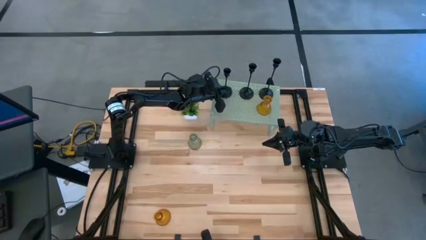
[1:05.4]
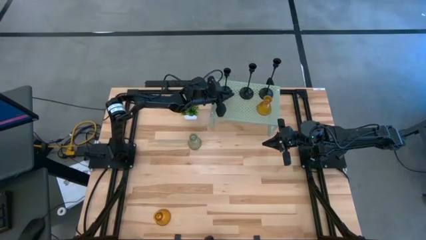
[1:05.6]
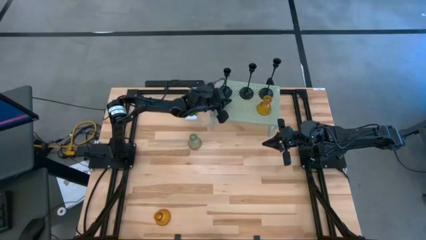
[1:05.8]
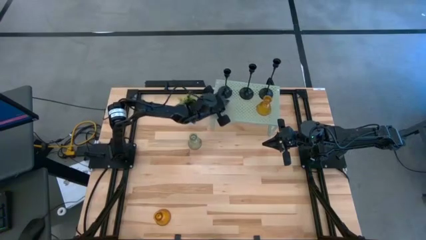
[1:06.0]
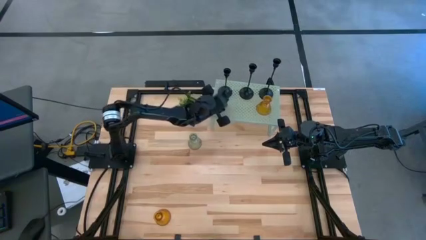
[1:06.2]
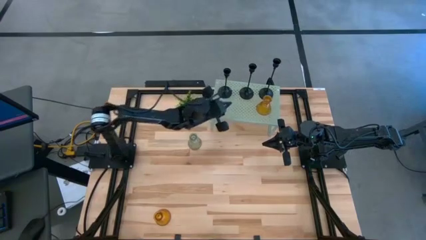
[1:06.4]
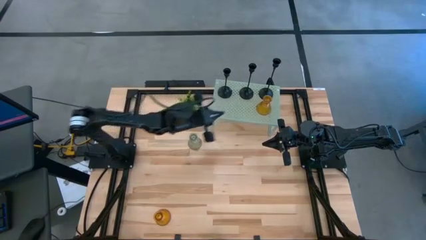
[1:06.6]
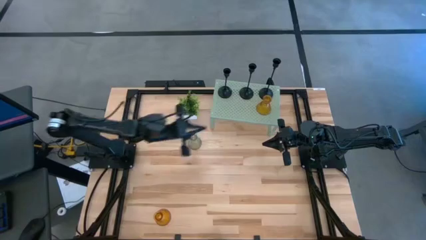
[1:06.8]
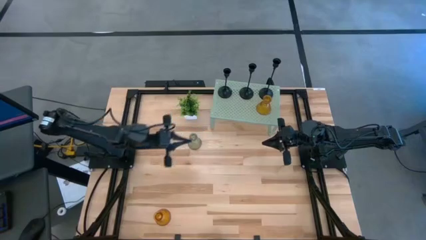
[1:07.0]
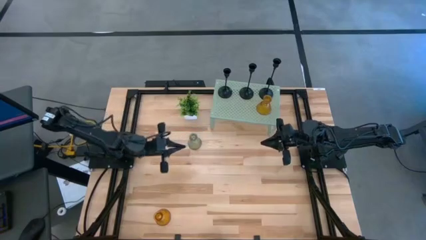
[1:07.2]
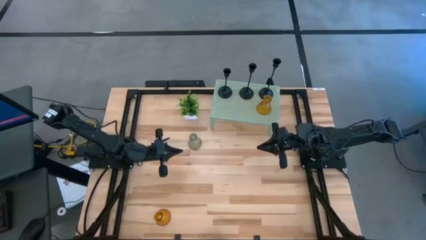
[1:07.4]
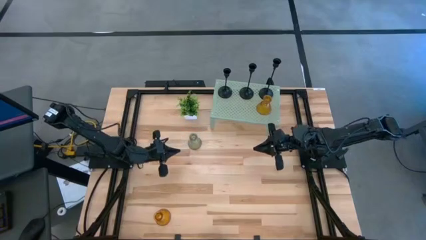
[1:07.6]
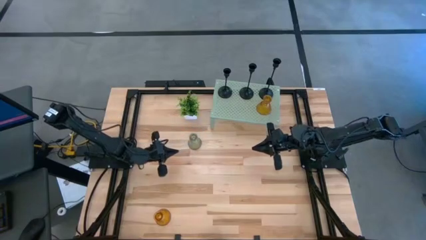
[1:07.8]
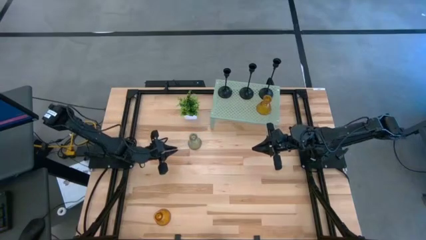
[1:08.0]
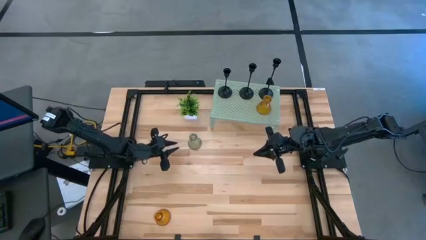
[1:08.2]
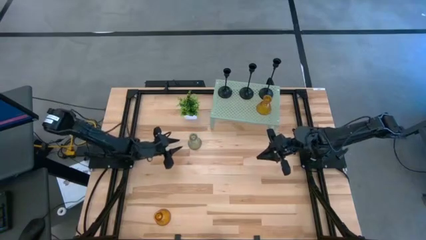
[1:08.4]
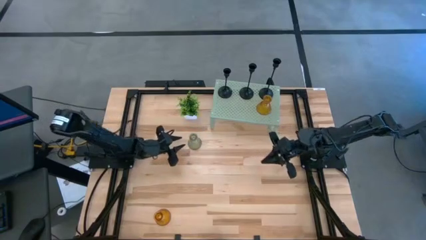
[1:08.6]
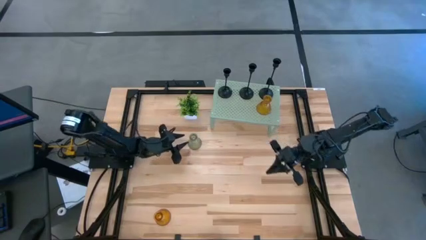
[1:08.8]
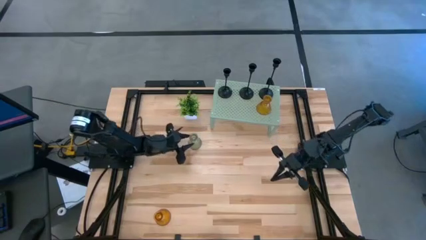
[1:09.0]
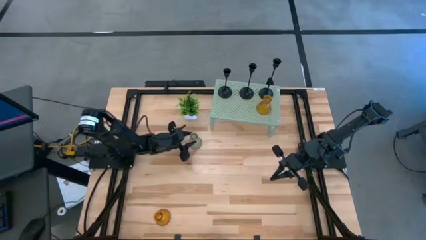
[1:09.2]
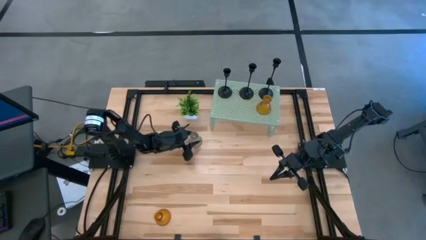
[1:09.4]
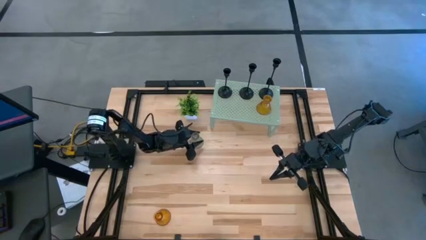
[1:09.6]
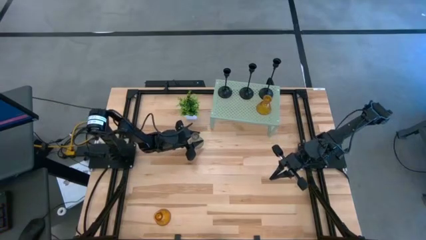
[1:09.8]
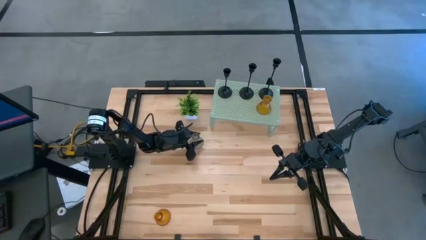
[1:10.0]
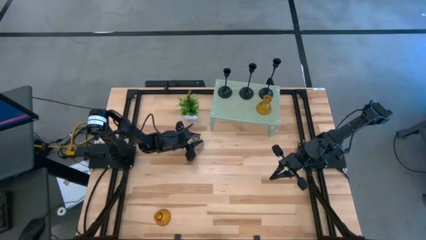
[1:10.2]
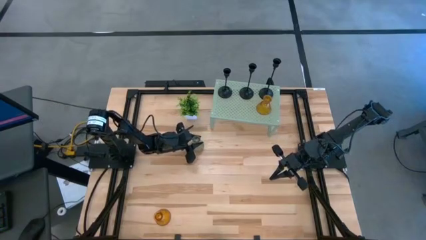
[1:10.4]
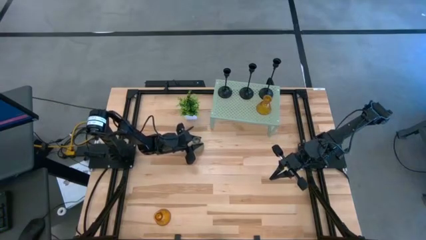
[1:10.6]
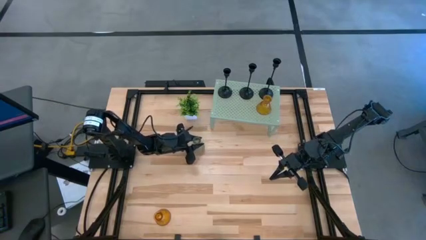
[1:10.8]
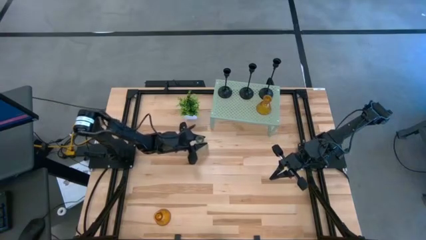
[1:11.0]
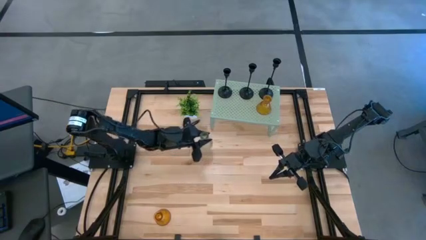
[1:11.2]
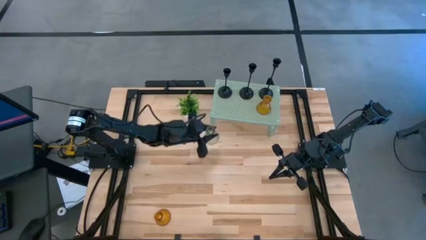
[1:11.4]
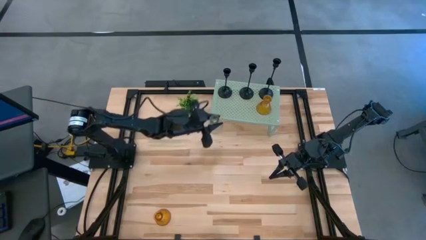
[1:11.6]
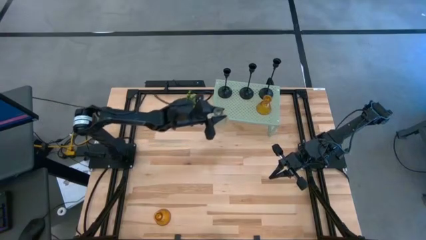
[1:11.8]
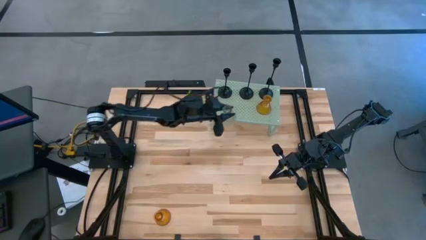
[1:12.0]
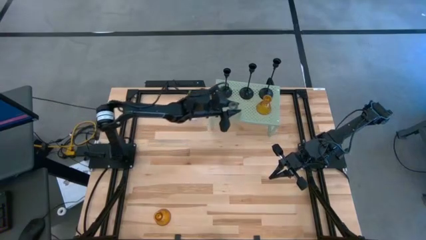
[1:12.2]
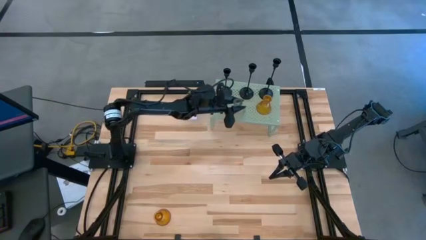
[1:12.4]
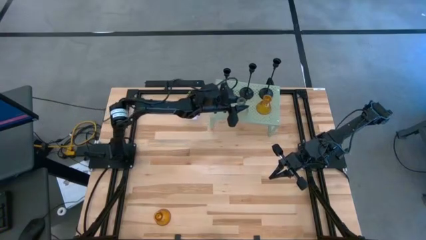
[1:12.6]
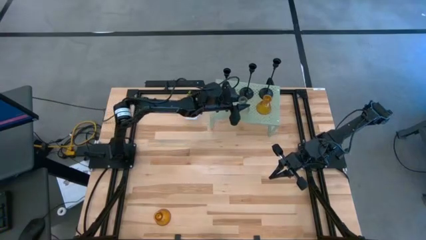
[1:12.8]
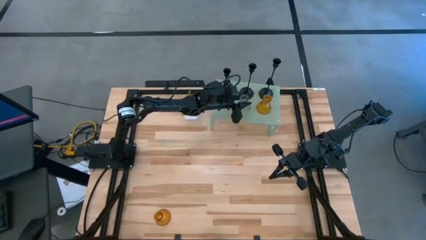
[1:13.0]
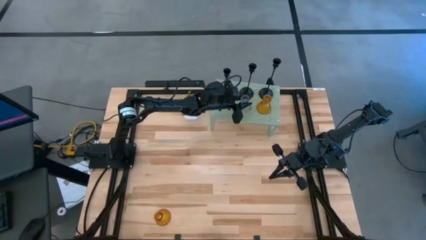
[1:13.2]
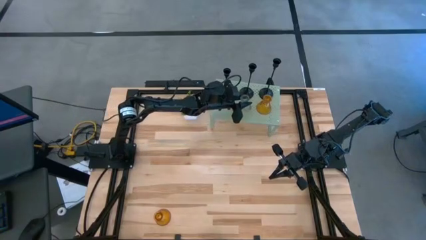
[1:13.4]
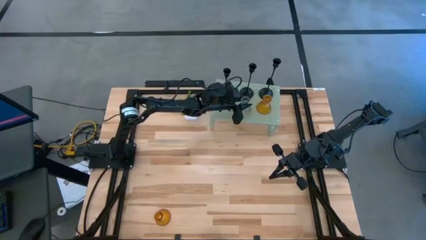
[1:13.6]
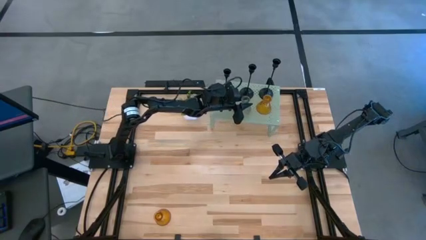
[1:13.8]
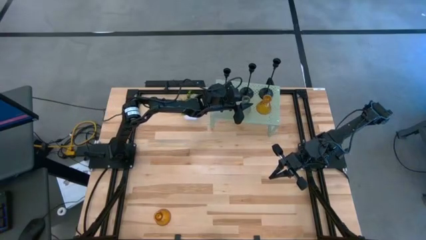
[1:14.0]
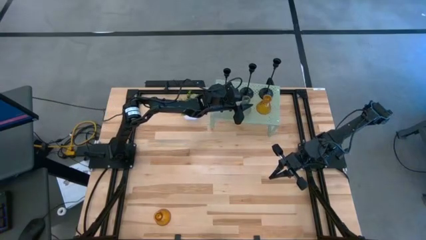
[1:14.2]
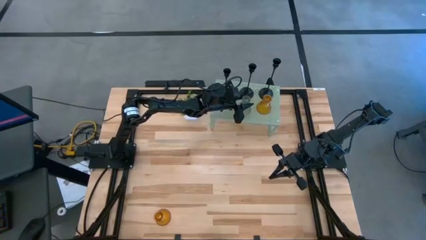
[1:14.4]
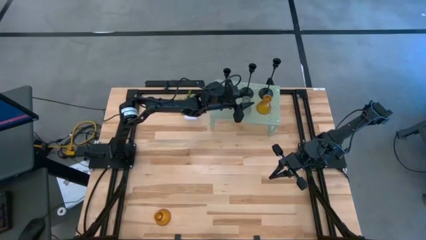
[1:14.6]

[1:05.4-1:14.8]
Task: Pick & Place candle stick holders
Put the white glass candle holder on the shelf

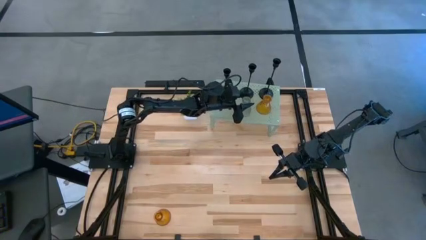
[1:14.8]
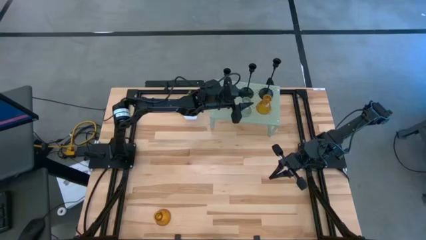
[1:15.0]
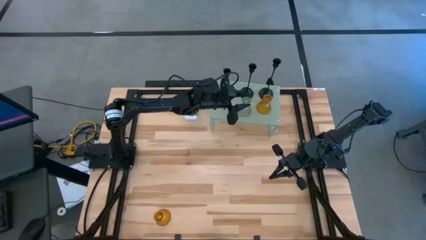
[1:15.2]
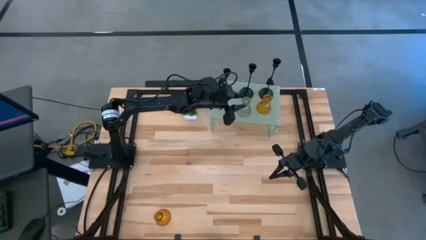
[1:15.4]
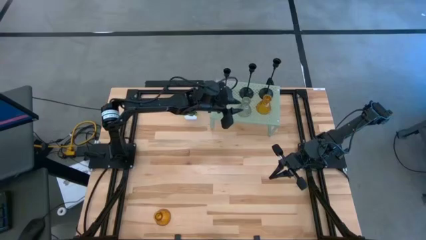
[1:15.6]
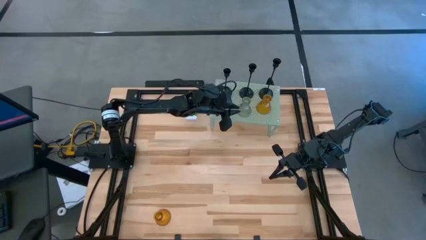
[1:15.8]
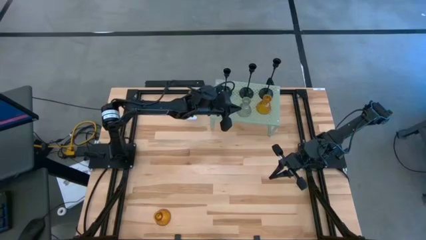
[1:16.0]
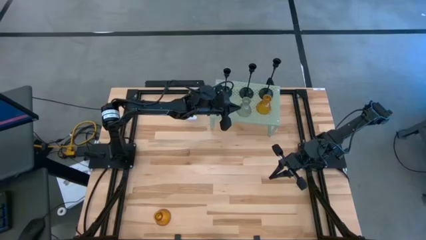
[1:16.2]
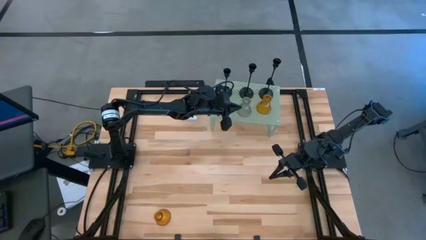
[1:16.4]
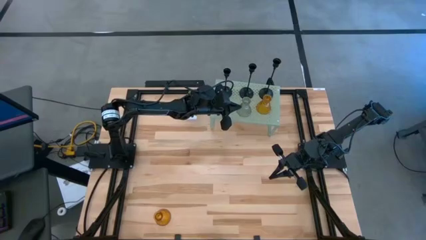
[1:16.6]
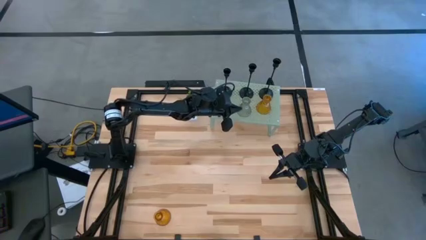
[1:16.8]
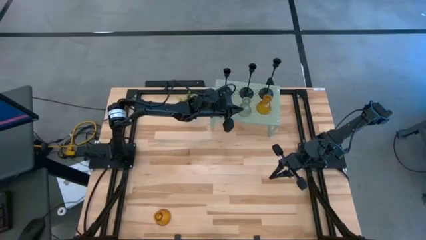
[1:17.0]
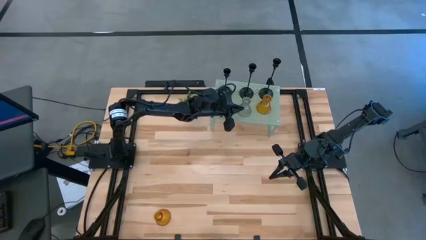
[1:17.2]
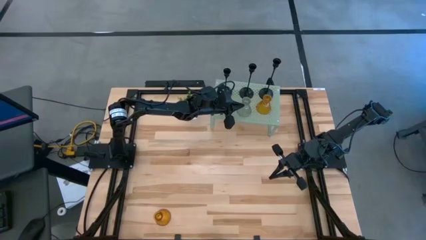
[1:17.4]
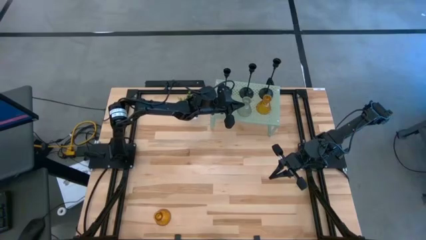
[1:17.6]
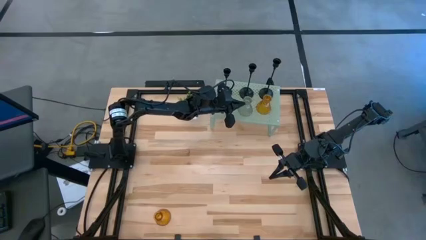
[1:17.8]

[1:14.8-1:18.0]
Adjust the white glass candle holder on the shelf

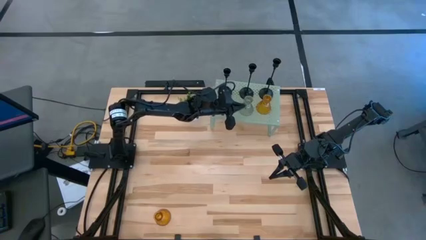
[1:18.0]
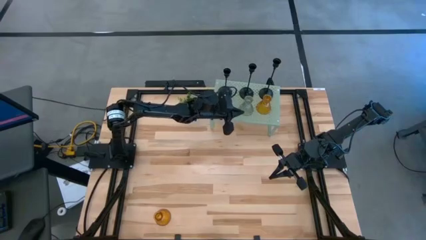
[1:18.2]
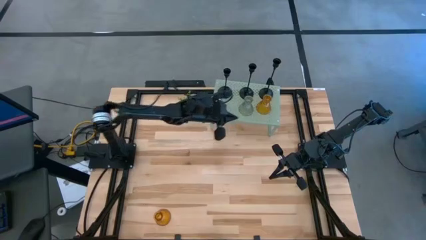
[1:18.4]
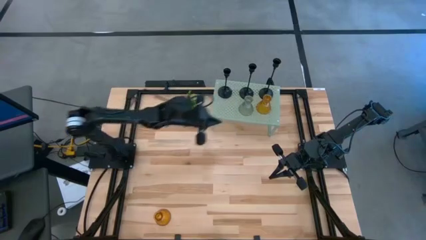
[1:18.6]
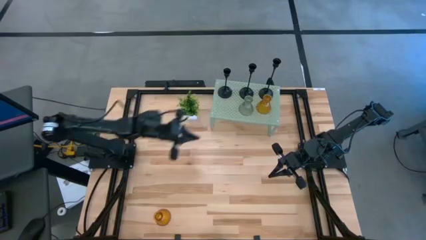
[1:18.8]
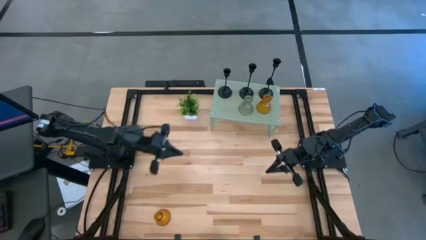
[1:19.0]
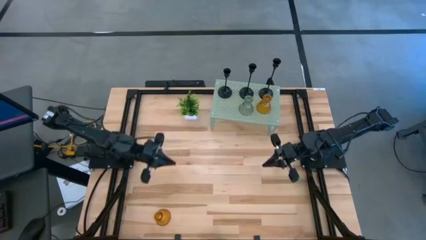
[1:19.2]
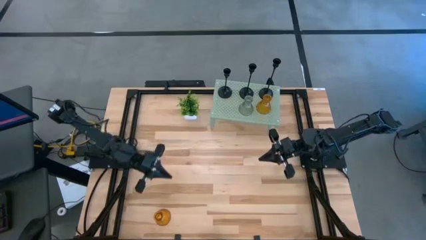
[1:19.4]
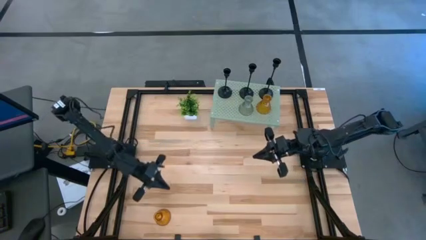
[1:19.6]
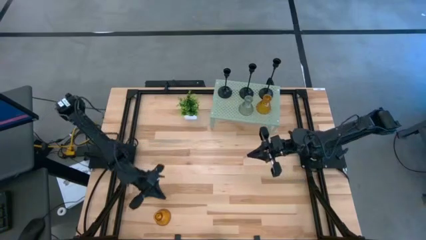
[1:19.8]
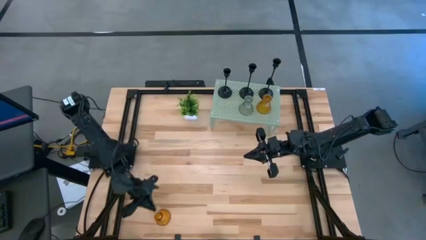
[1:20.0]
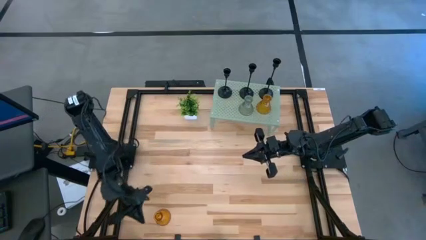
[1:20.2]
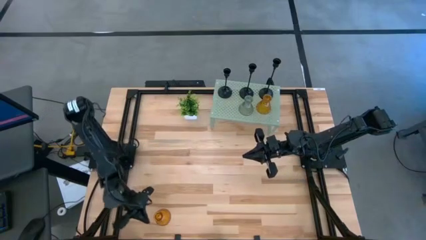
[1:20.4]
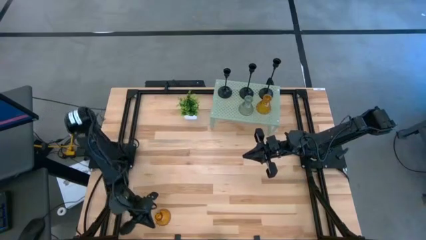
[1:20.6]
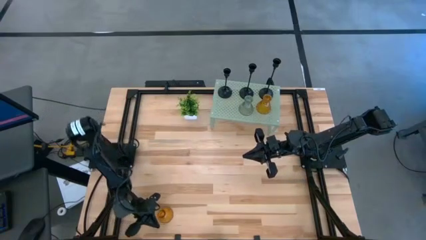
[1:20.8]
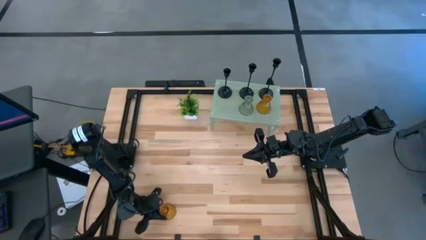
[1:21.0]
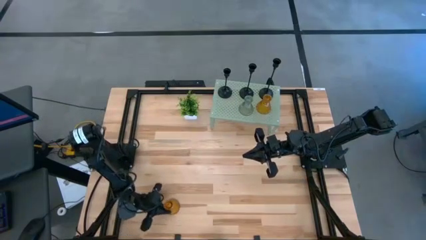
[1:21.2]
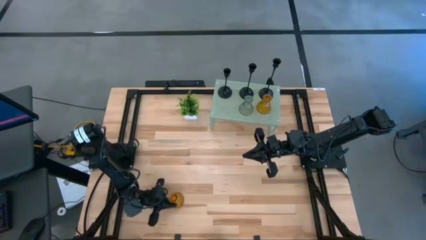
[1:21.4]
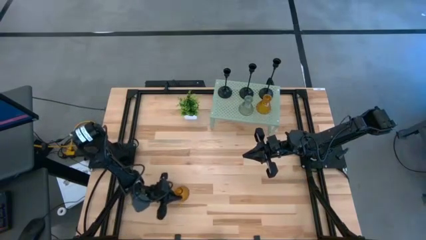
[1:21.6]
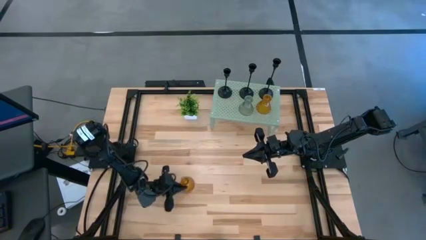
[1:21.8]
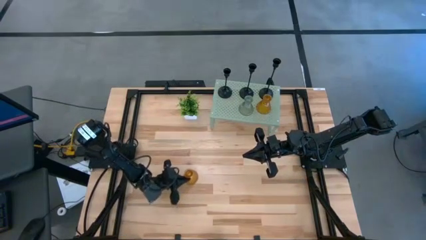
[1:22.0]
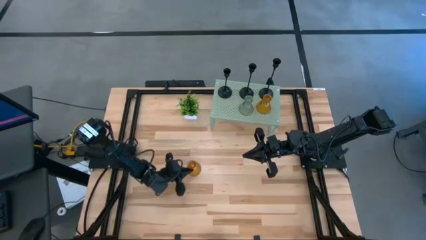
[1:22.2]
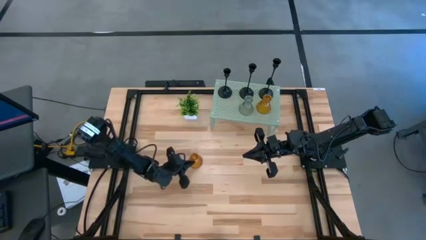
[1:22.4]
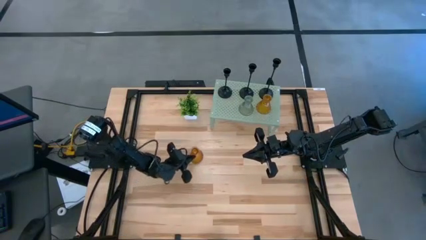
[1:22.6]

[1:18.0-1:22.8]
Move the gold glass candle holder to the center of the table
